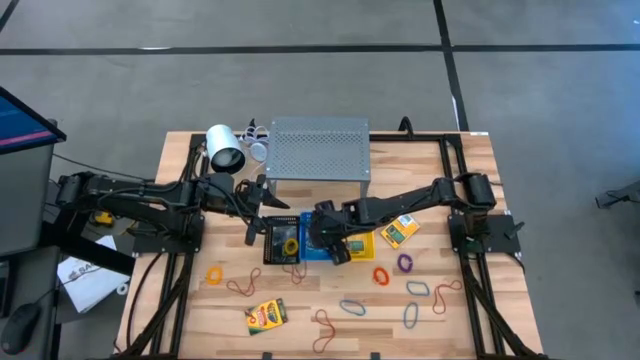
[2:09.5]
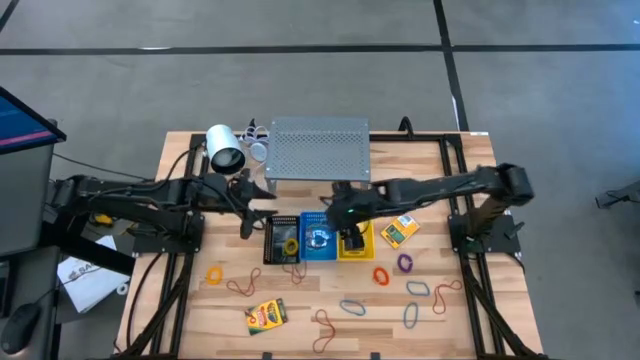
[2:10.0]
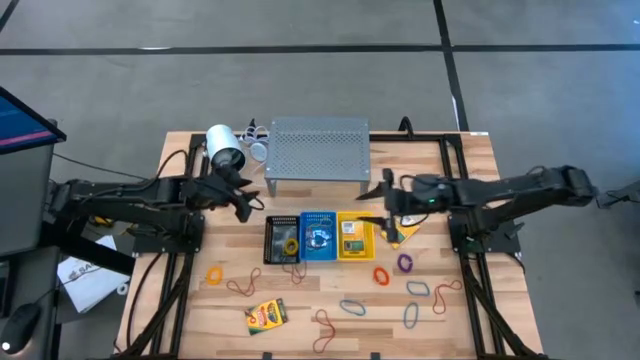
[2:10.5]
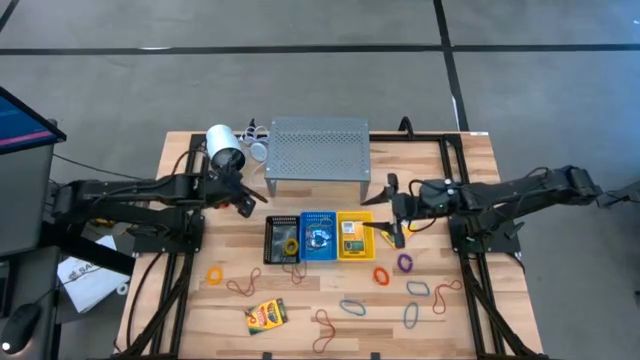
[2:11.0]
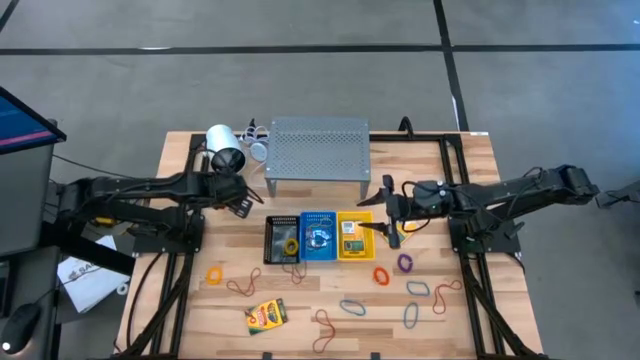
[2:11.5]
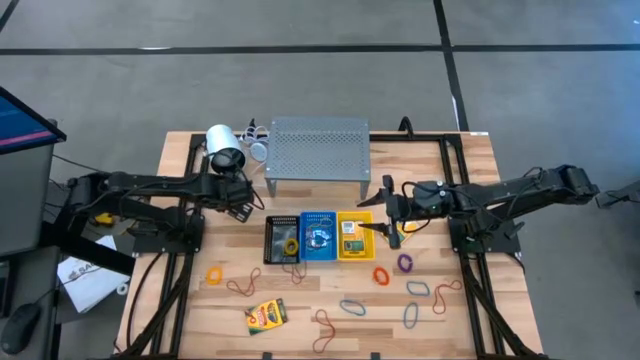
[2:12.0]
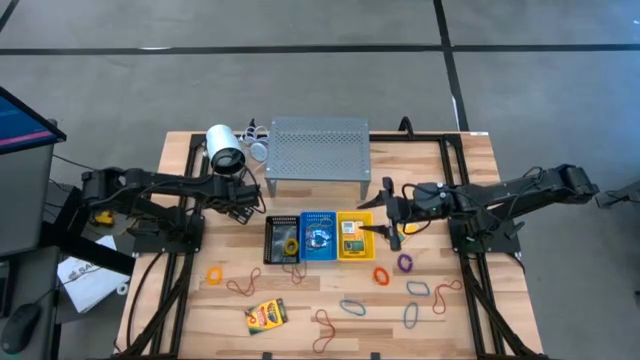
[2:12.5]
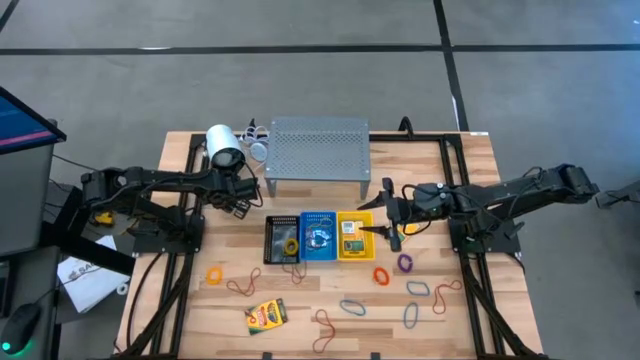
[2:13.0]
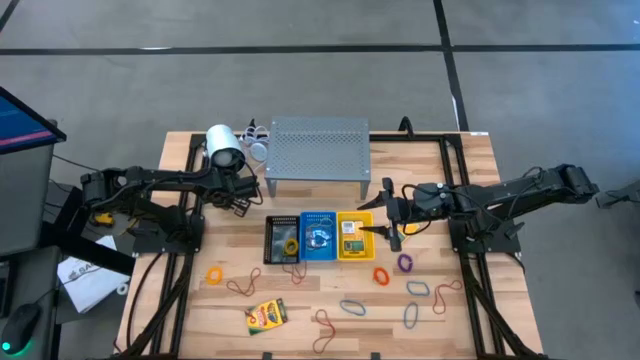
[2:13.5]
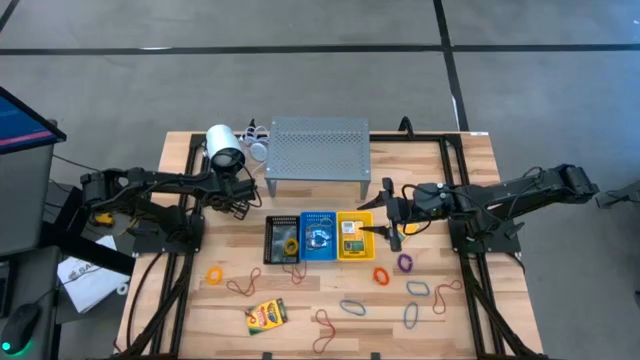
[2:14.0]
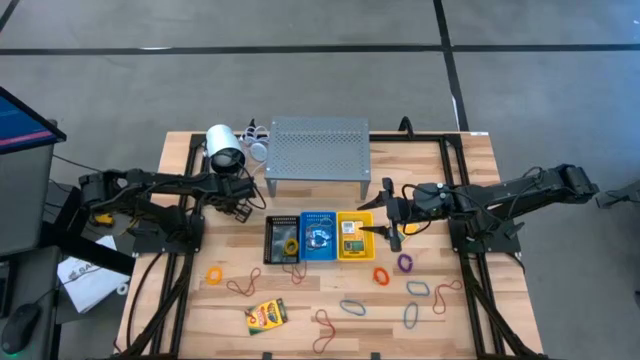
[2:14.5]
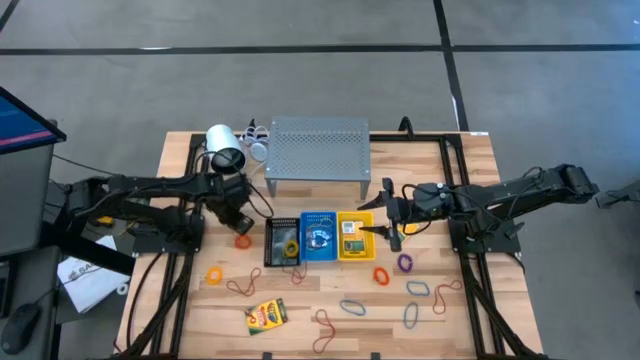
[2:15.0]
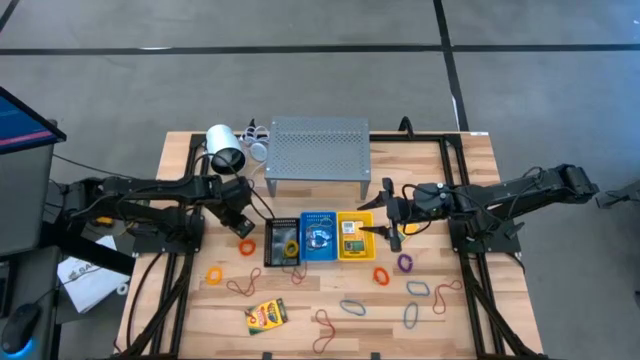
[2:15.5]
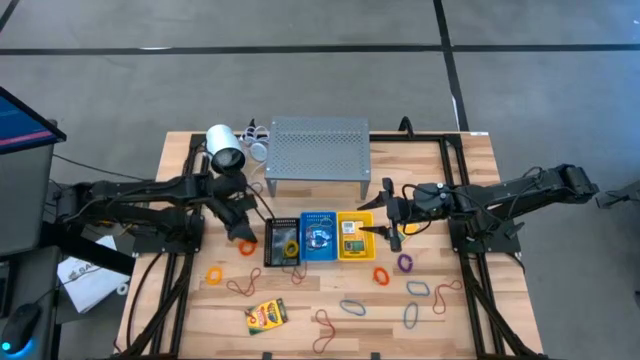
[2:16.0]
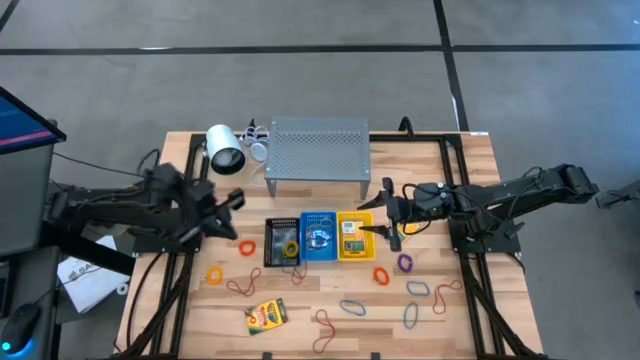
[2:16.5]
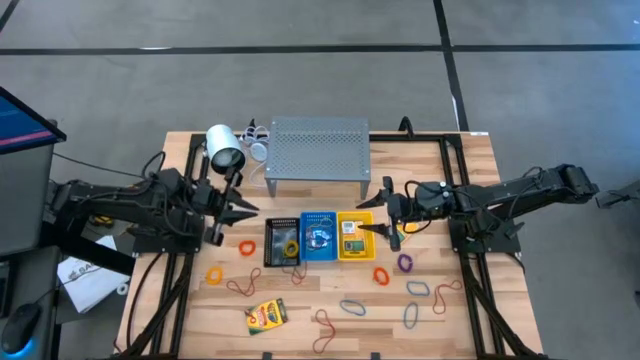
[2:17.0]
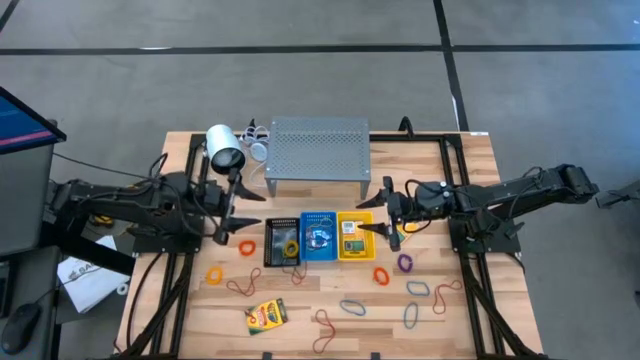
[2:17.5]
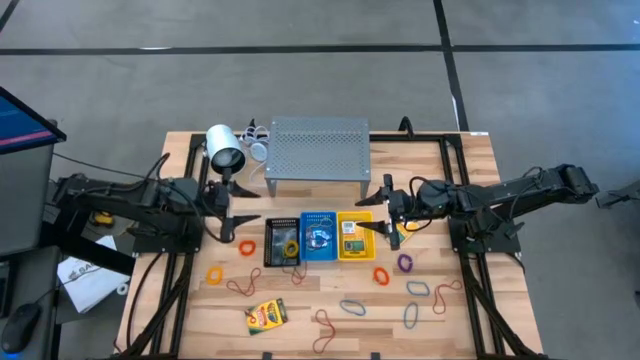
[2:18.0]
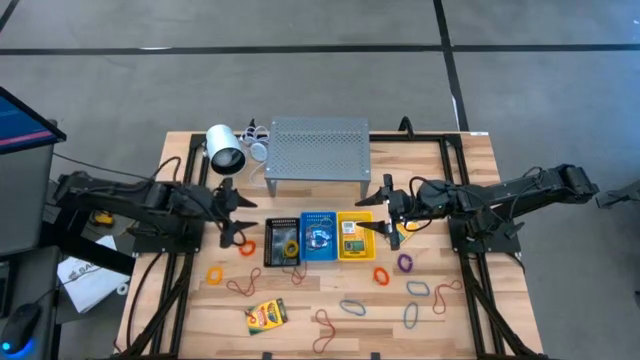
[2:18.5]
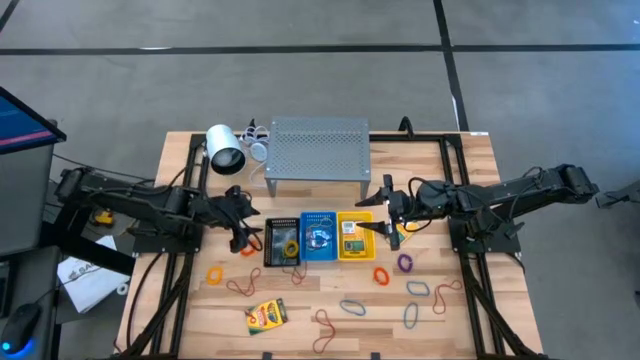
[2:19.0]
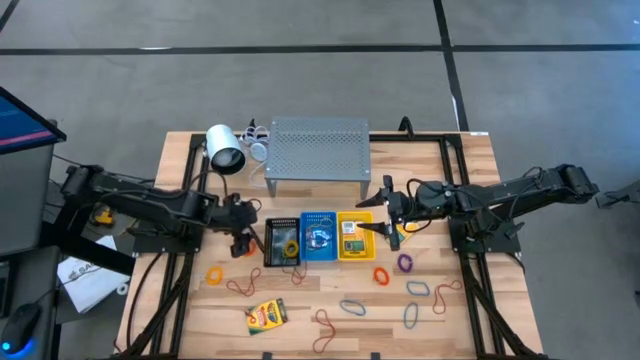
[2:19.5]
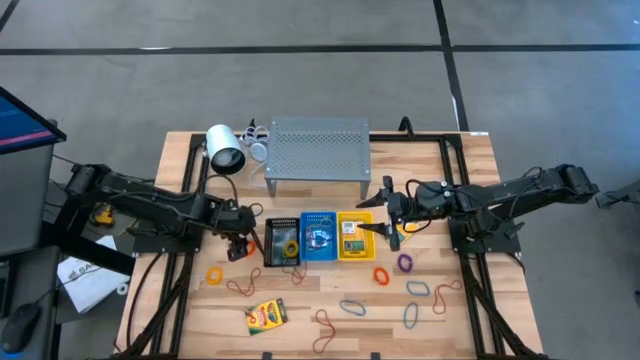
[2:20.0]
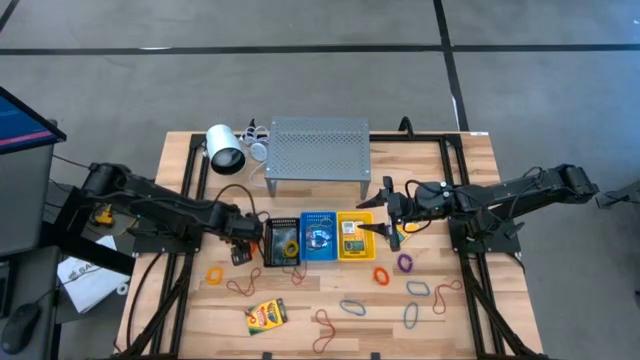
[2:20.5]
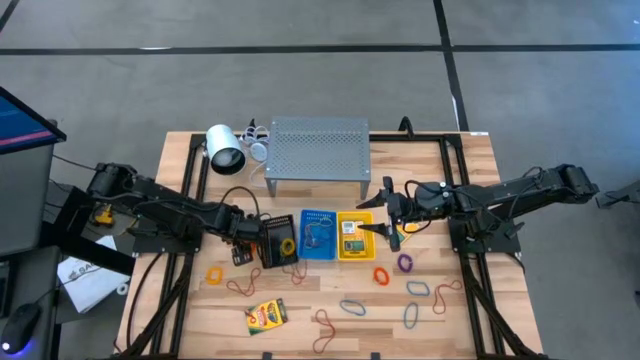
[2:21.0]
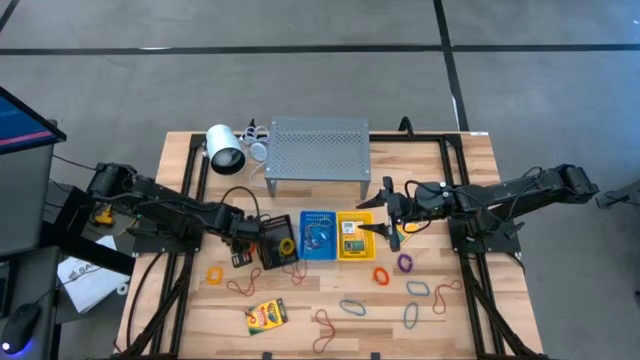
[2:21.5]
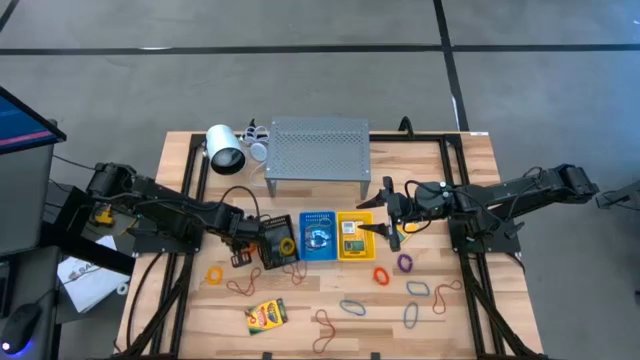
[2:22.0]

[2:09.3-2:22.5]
Task: Pick & Place Office Desk Supplies
Put the orange spring keychain into the black basket

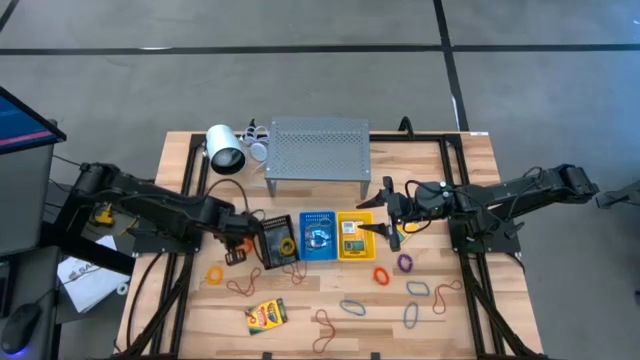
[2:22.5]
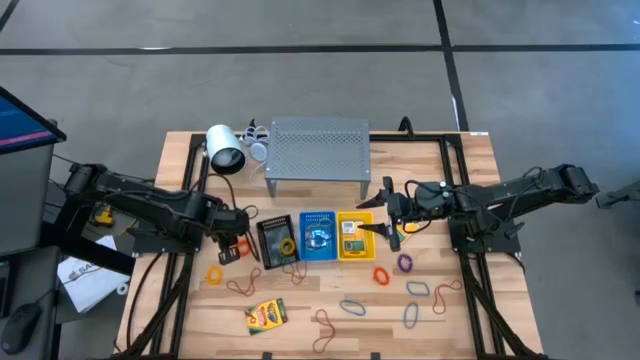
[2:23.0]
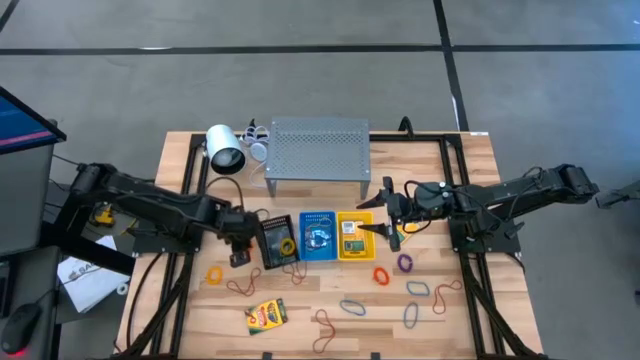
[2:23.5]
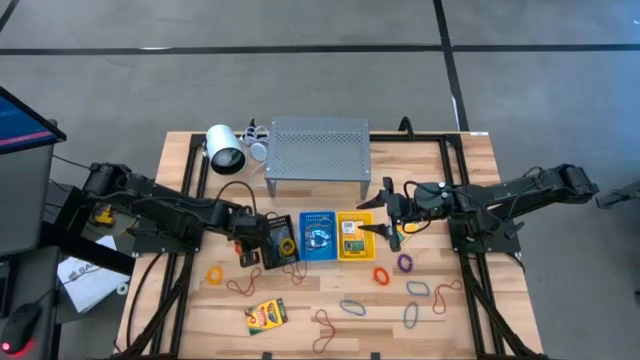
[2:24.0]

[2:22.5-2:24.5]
Adjust the black basket

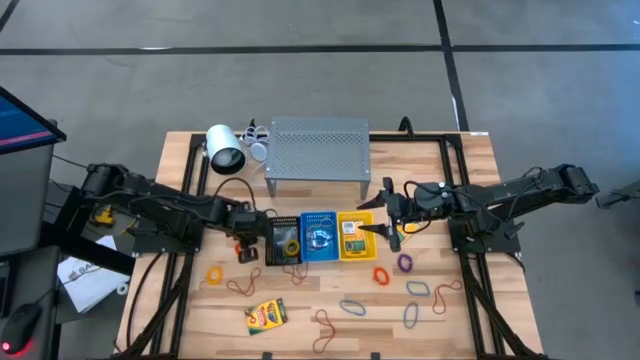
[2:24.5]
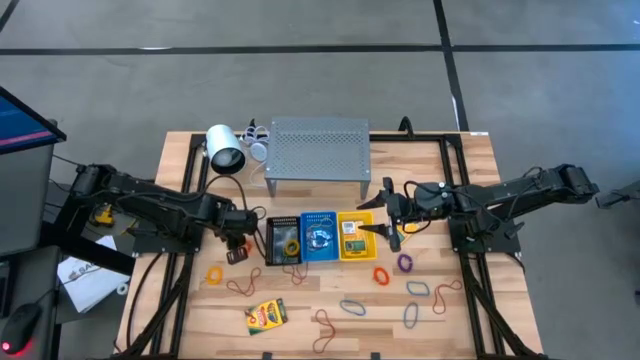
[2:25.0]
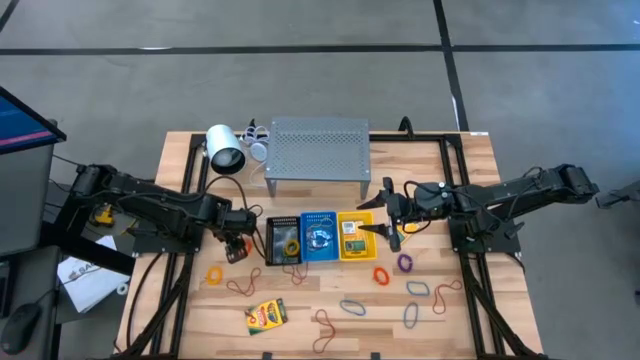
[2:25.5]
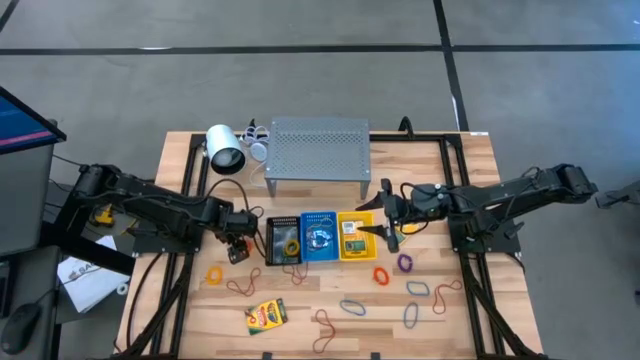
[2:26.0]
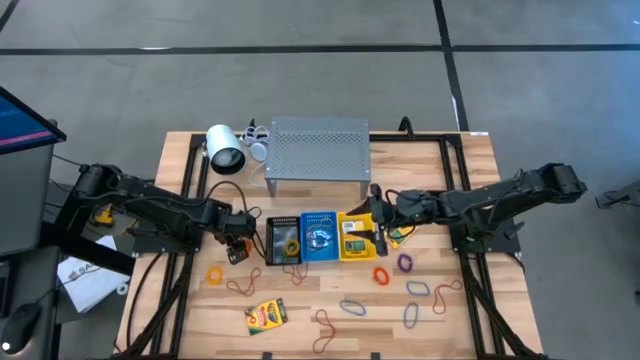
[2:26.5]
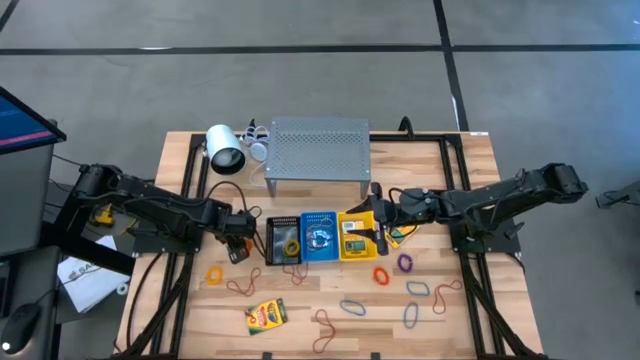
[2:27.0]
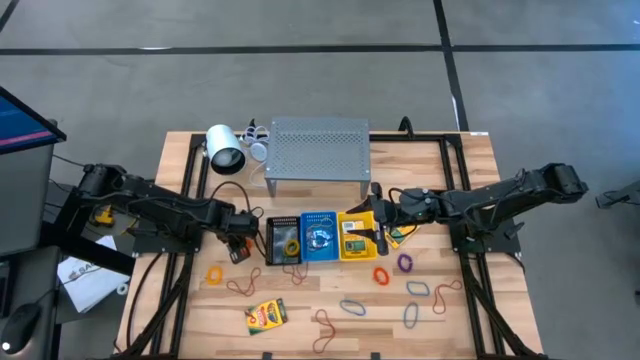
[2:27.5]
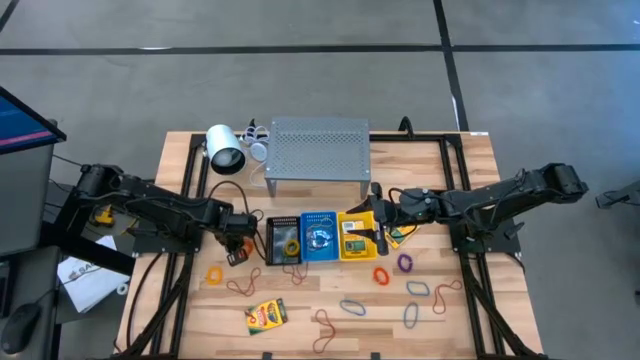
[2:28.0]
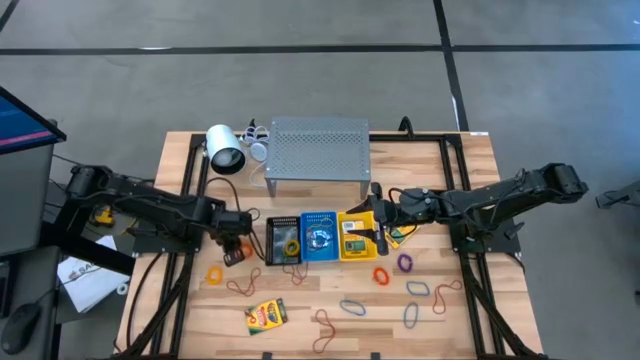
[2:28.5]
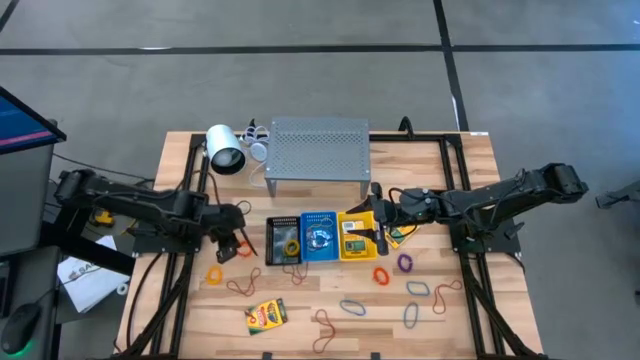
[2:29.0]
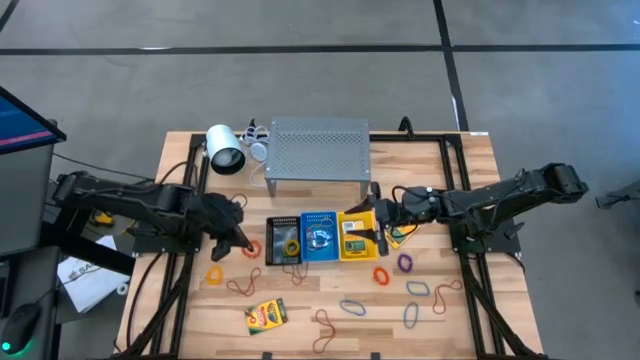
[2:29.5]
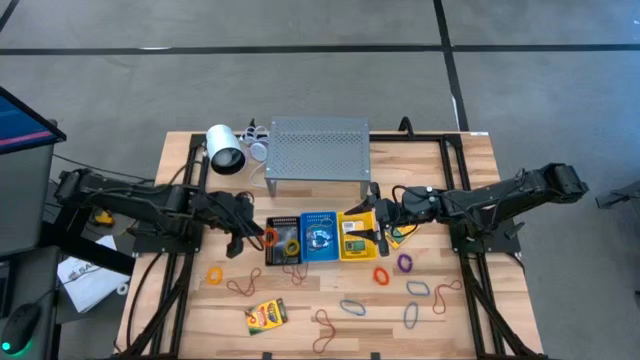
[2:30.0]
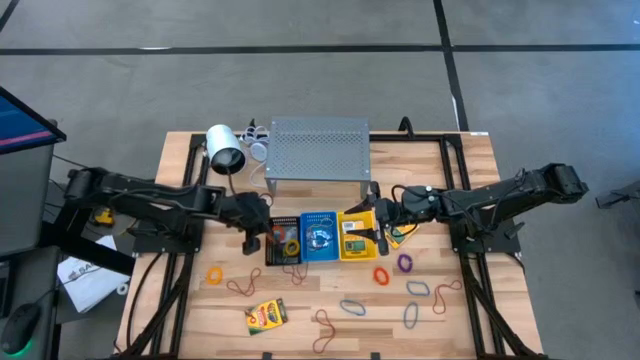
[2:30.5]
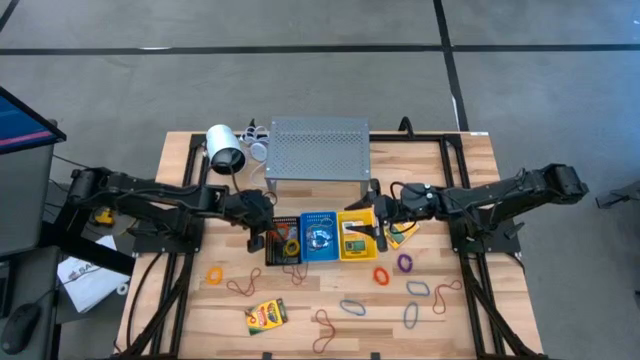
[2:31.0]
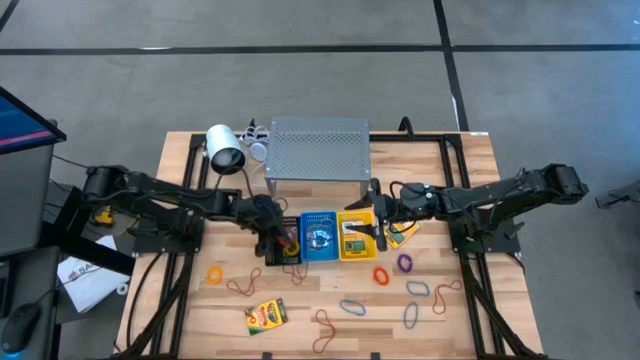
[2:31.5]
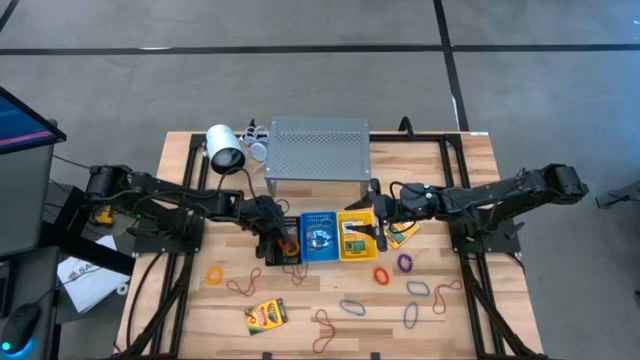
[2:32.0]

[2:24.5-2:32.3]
Put the orange spring keychain into the black basket
